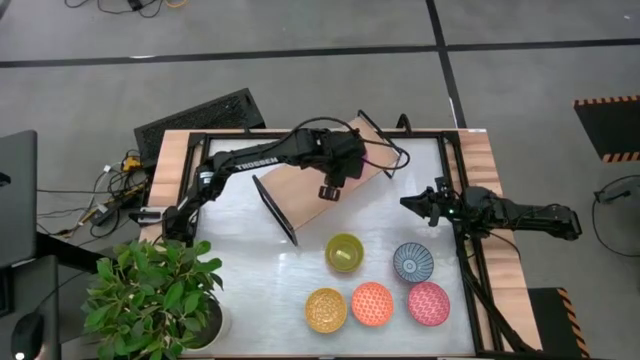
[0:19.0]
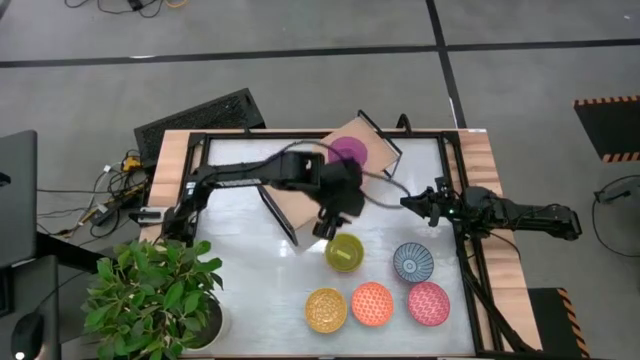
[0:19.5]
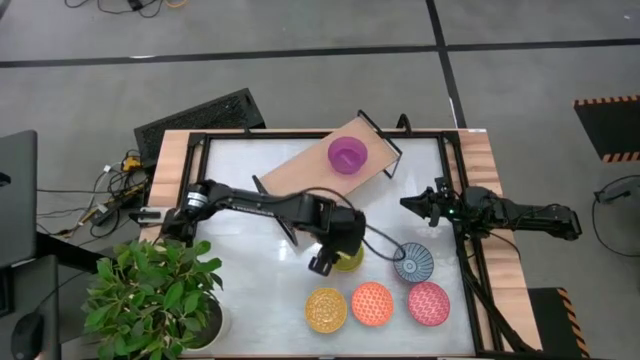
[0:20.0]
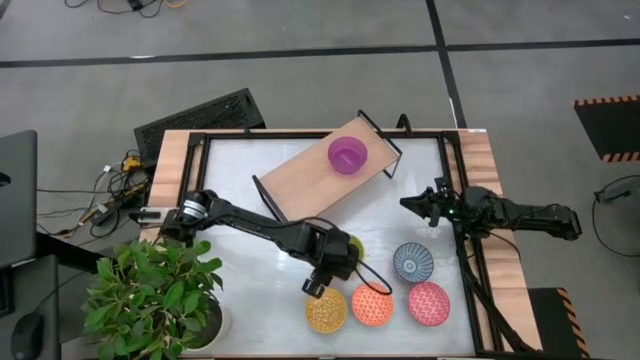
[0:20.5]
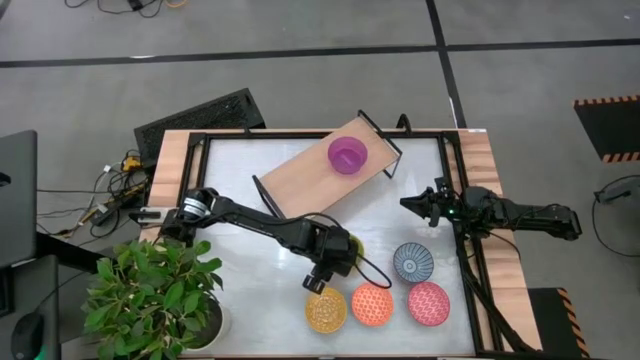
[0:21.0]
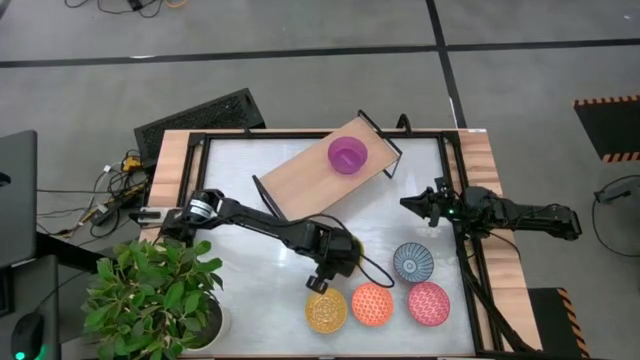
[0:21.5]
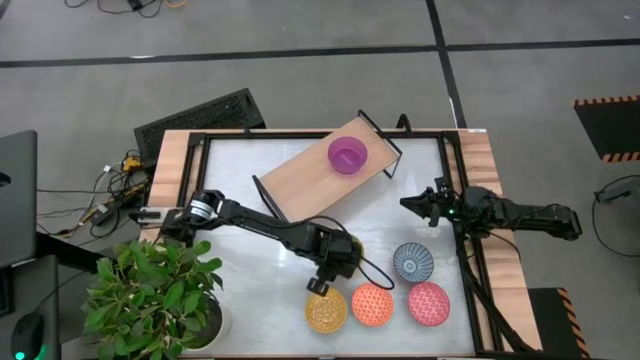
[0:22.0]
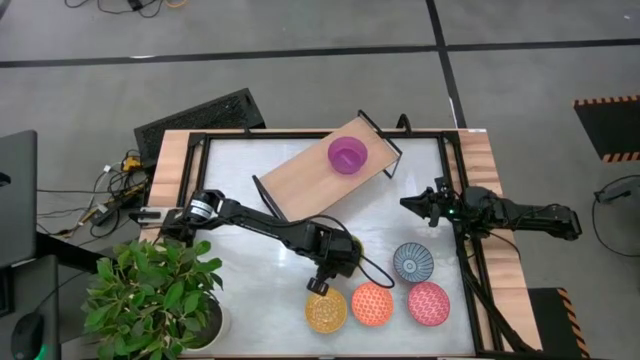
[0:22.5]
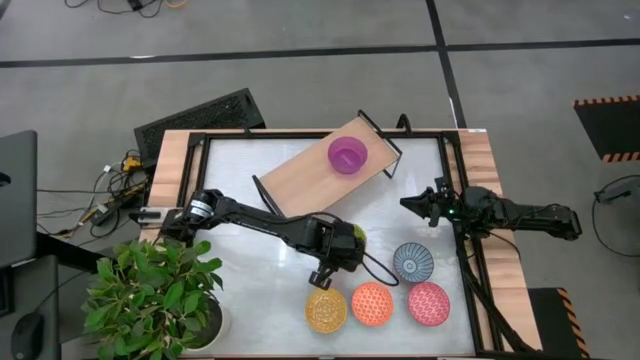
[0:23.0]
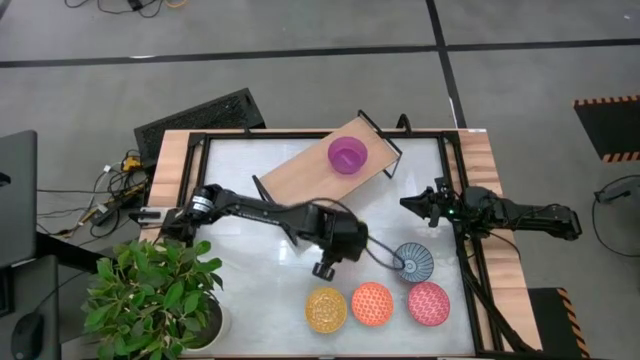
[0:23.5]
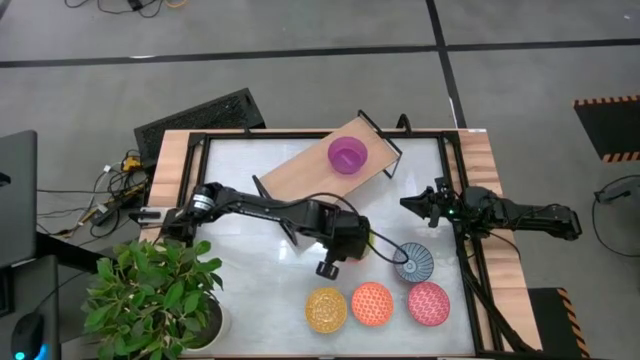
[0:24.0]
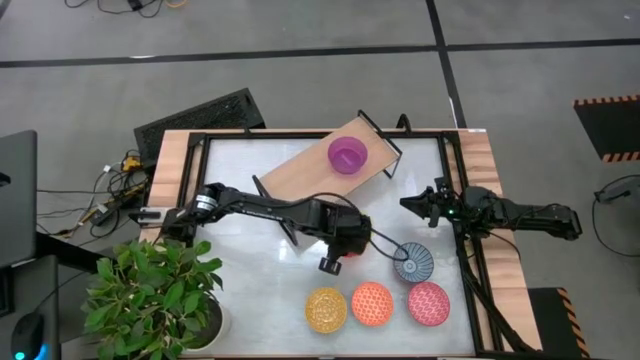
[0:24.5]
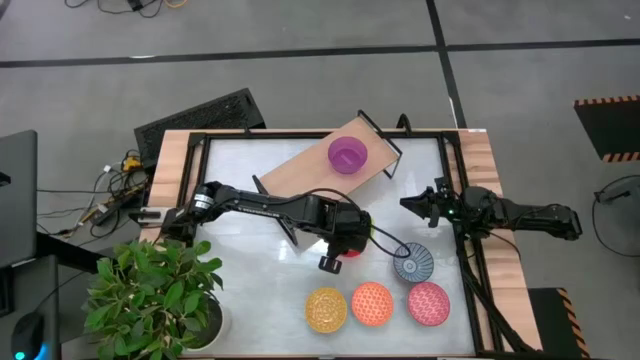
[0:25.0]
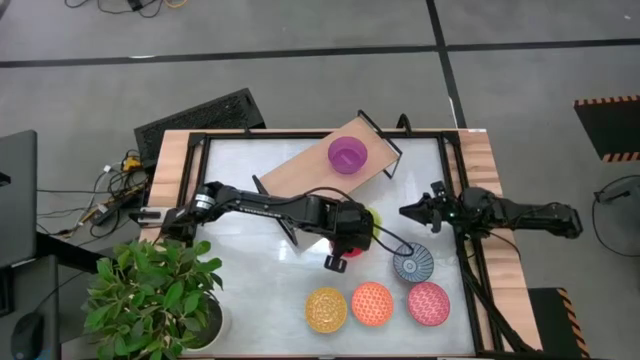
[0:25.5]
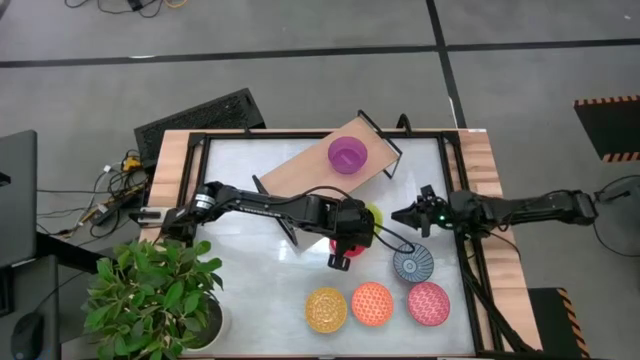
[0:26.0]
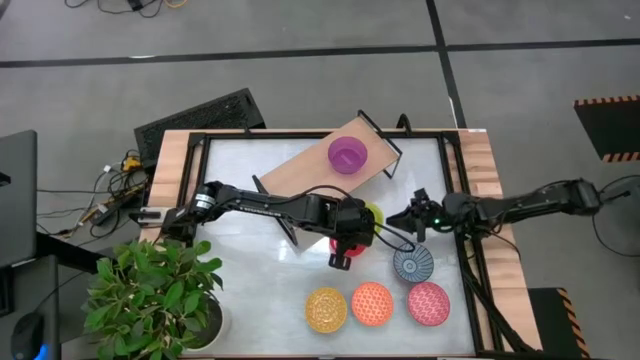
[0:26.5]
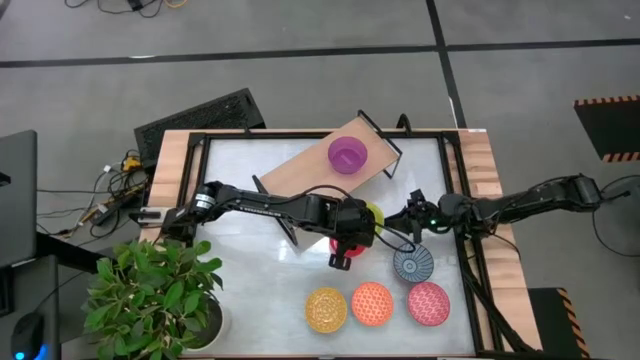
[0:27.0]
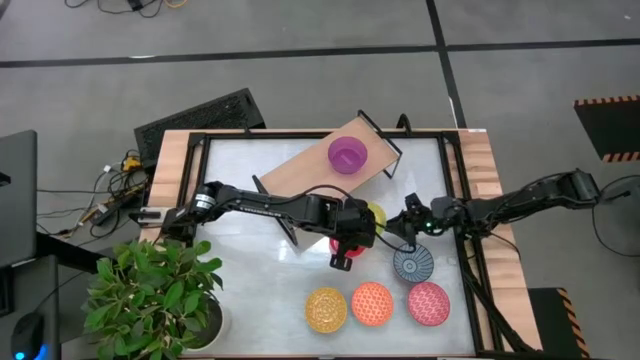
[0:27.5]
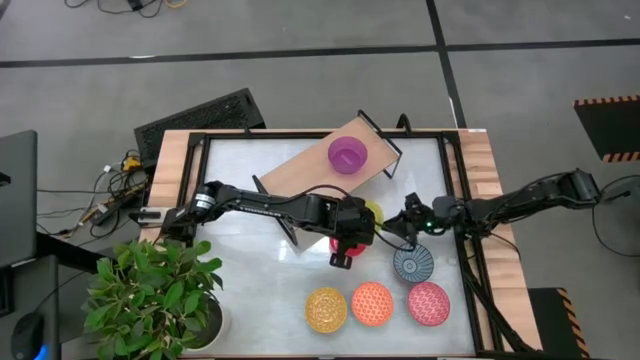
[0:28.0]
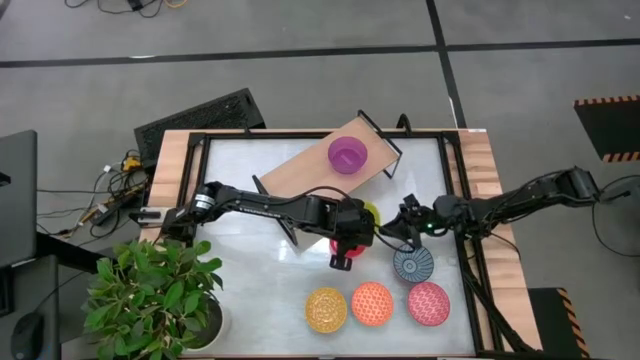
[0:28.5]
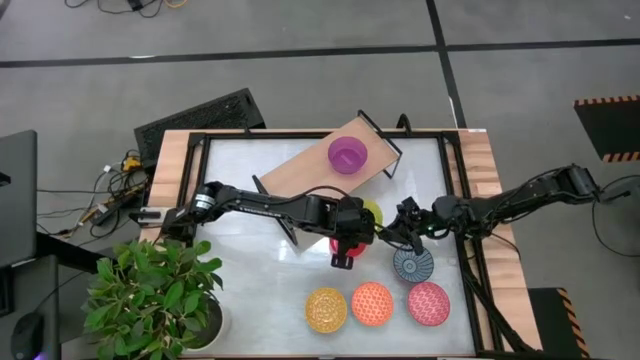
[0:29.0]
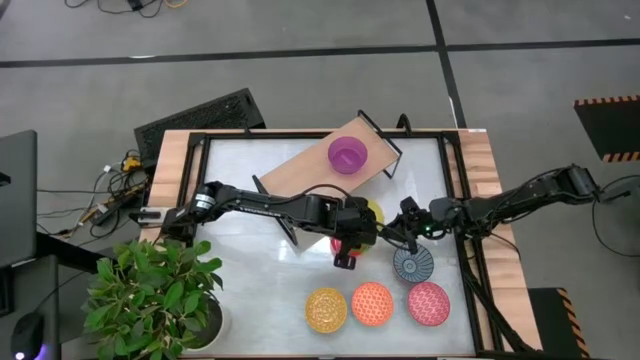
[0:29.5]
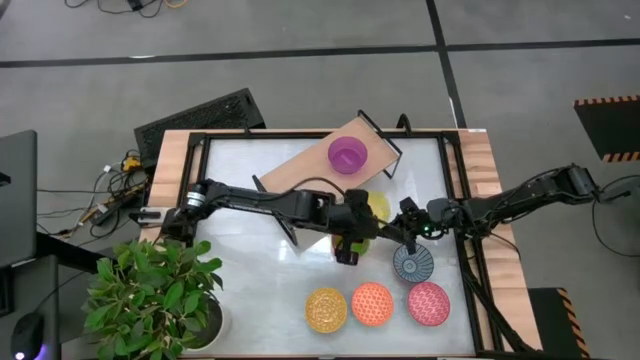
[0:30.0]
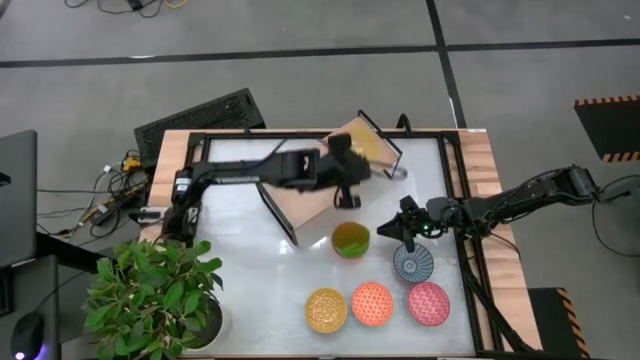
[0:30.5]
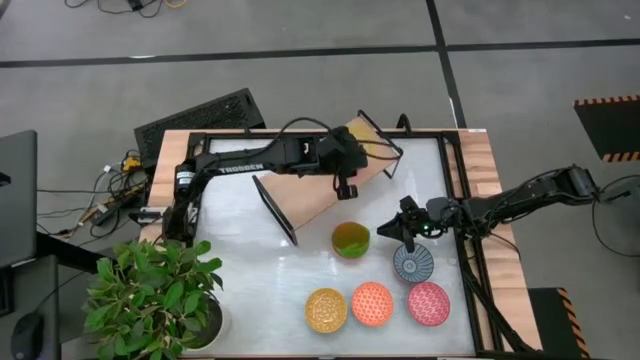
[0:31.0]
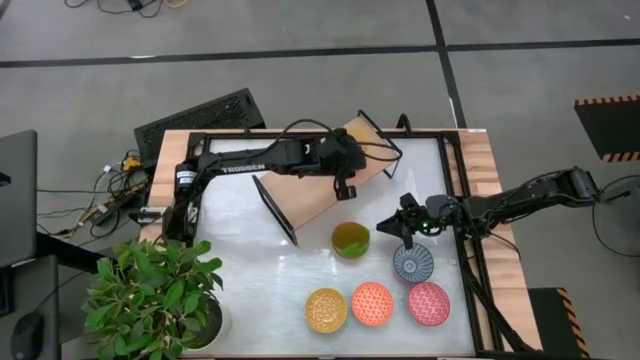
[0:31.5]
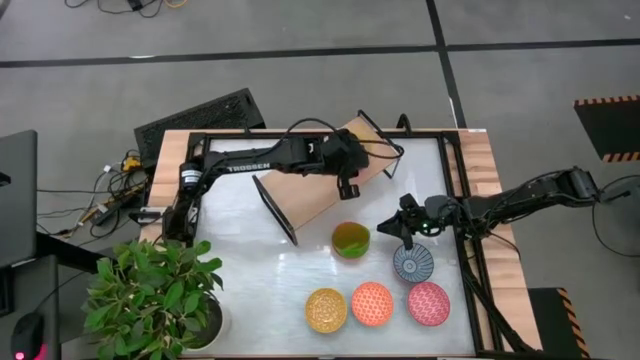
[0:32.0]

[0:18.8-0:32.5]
Task: Place and stack bowls onto a shelf
Stack the yellow bowl on top of the purple bowl on the shelf

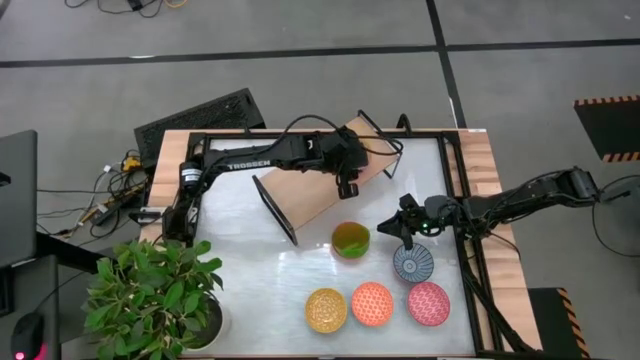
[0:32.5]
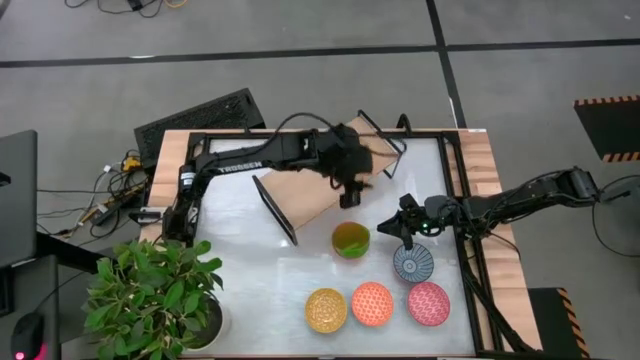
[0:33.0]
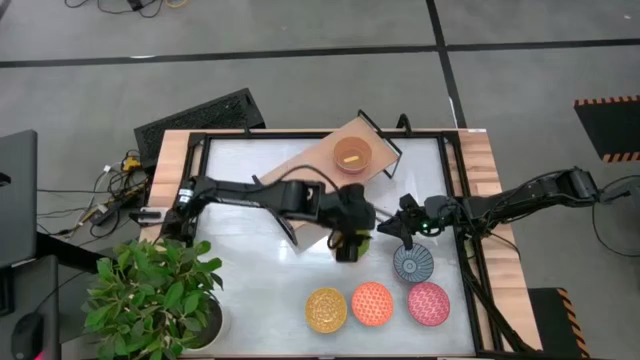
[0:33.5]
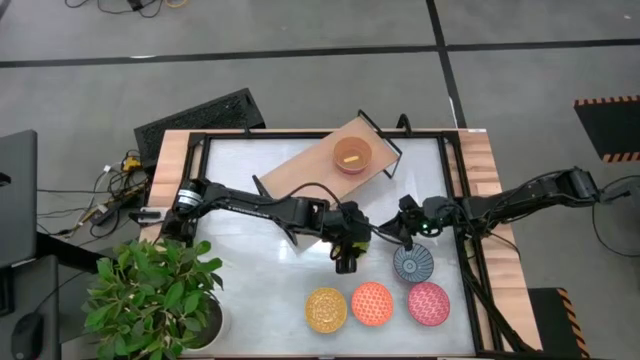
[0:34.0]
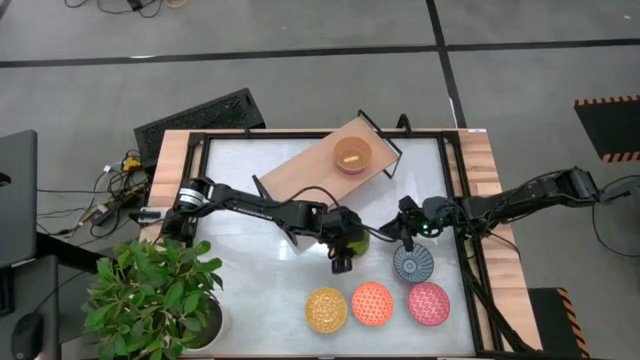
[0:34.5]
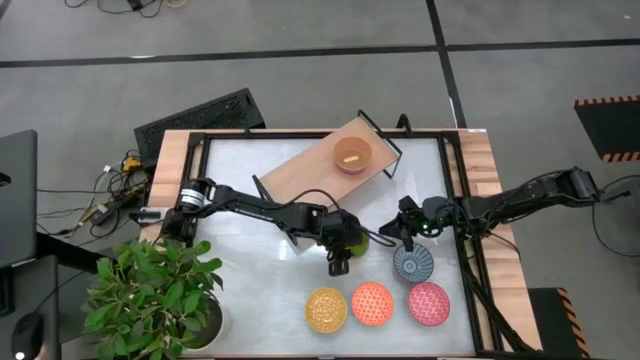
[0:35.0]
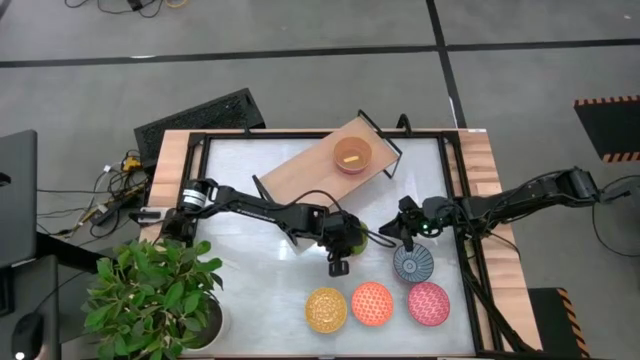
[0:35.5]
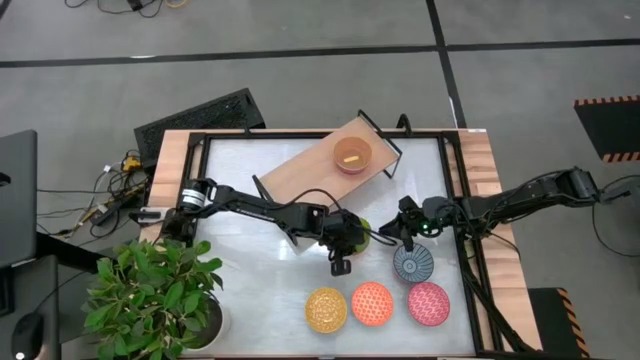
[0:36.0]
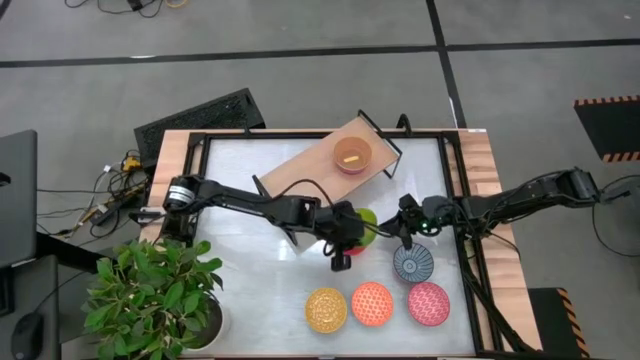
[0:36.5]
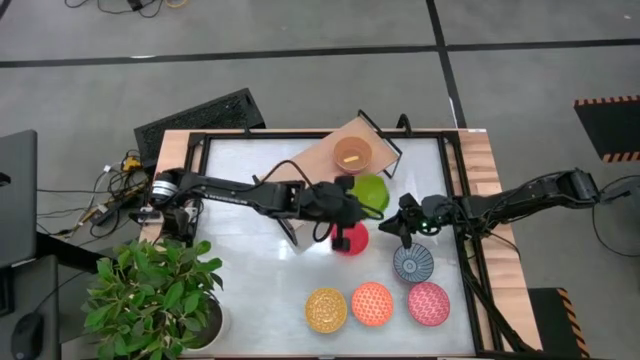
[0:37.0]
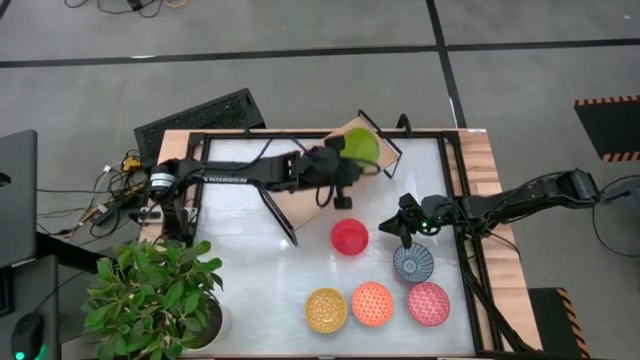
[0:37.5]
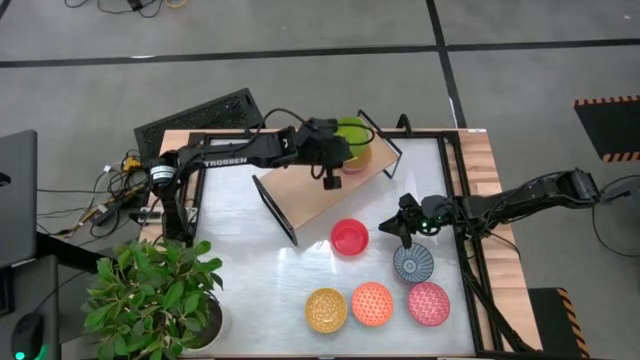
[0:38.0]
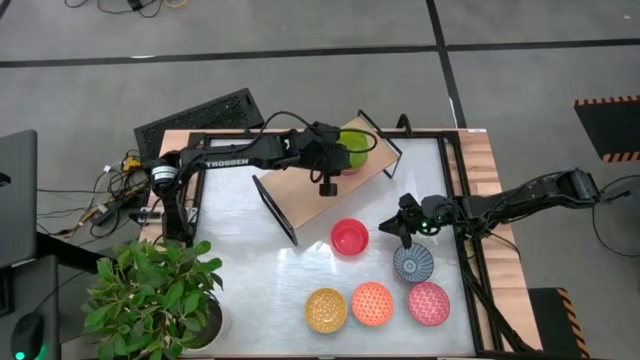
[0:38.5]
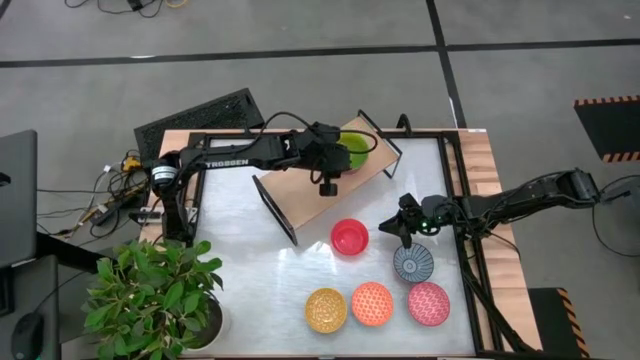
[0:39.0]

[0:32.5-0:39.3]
Stack the green bowl on top of the yellow bowl on the shelf
